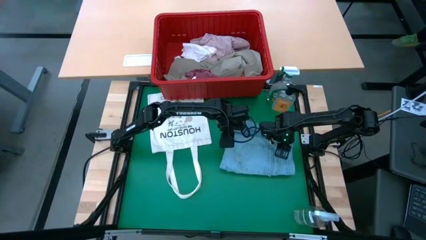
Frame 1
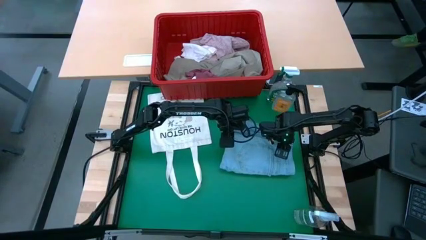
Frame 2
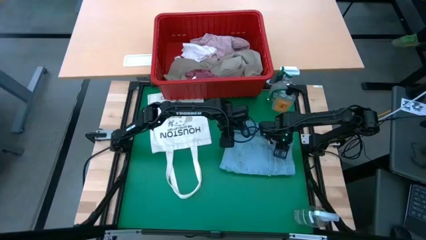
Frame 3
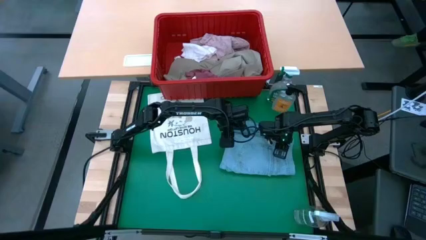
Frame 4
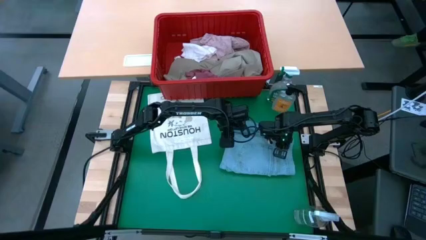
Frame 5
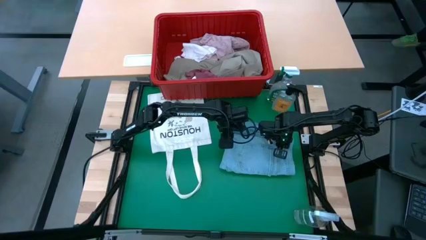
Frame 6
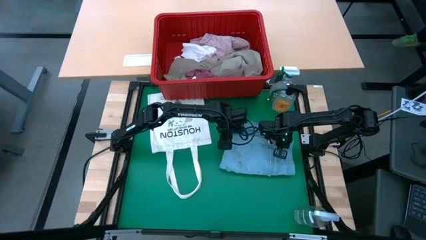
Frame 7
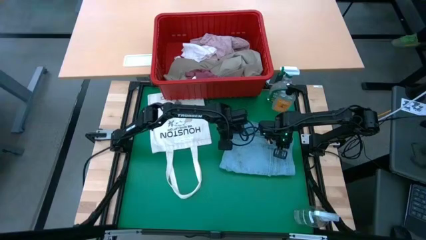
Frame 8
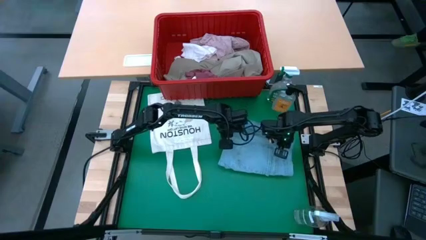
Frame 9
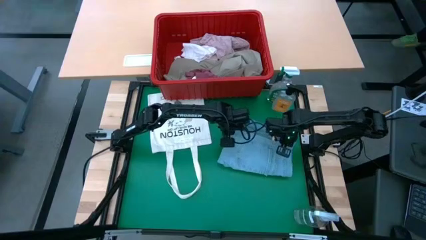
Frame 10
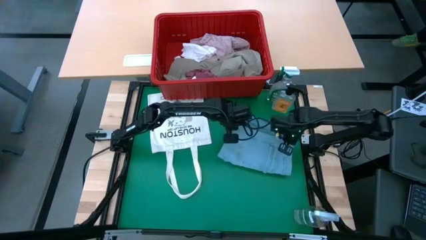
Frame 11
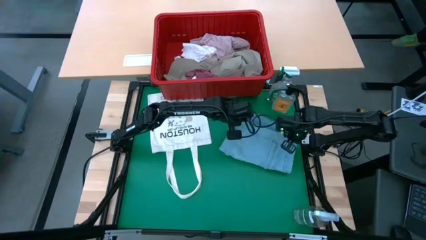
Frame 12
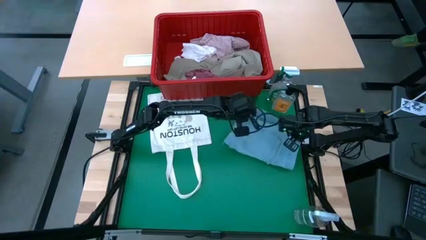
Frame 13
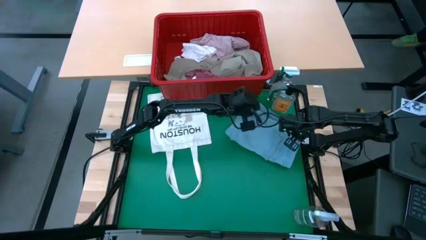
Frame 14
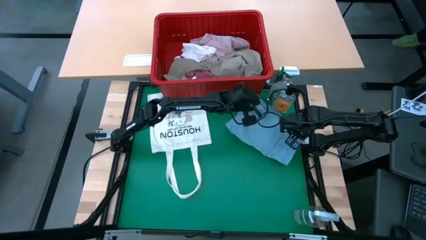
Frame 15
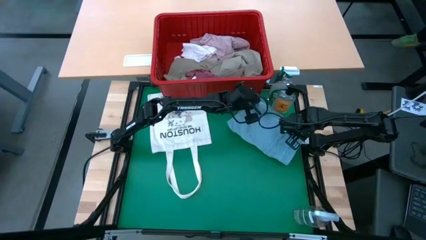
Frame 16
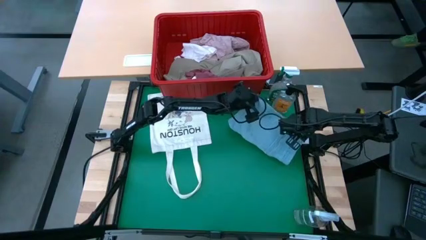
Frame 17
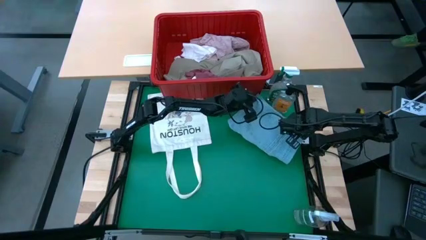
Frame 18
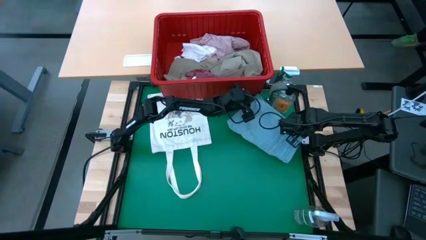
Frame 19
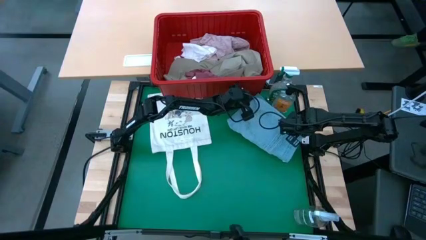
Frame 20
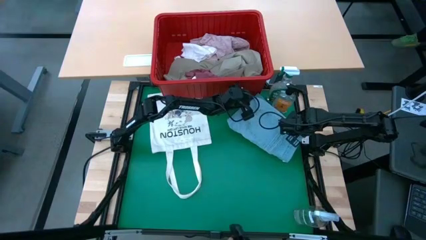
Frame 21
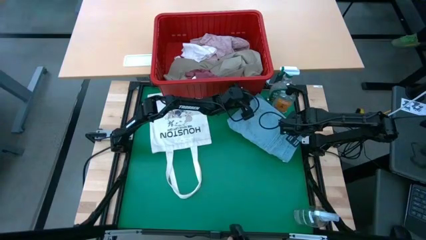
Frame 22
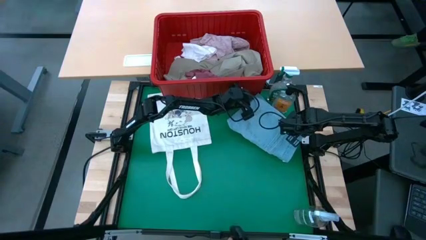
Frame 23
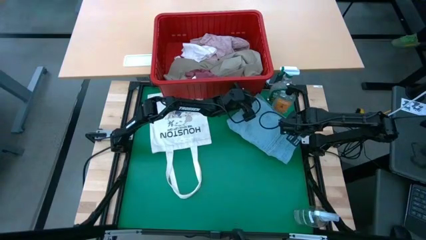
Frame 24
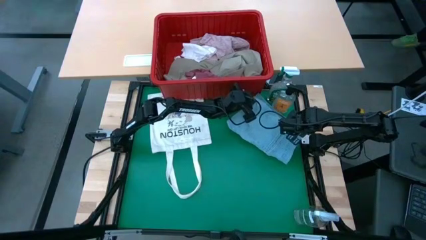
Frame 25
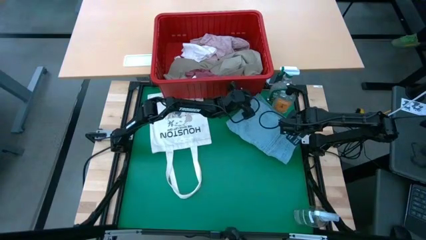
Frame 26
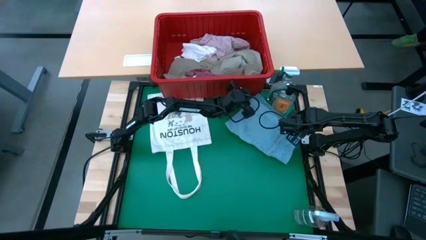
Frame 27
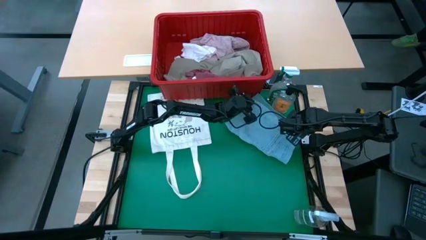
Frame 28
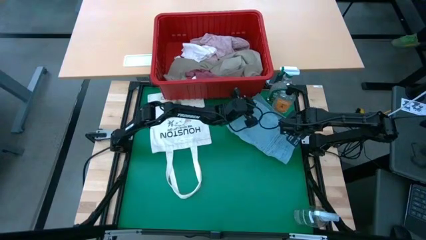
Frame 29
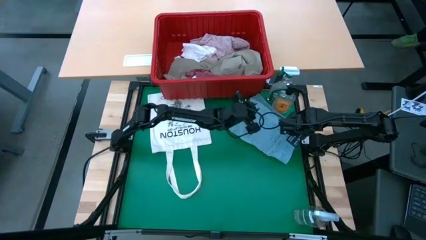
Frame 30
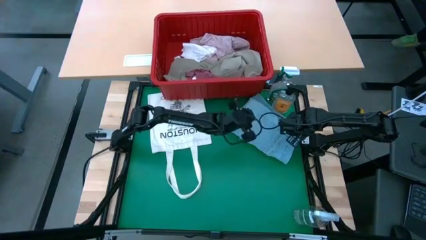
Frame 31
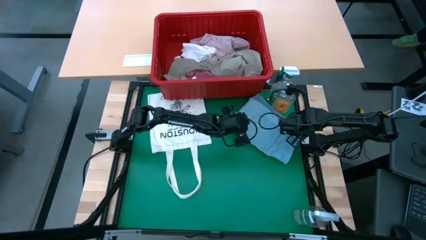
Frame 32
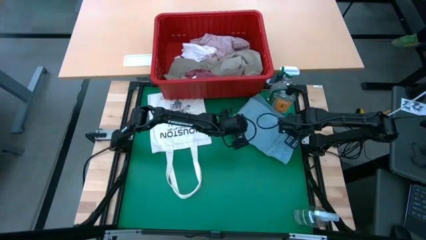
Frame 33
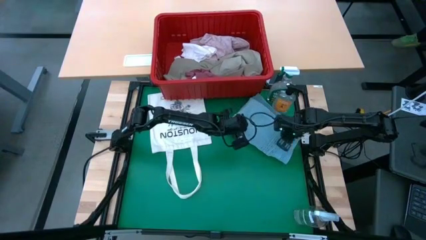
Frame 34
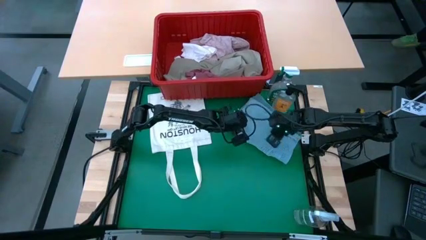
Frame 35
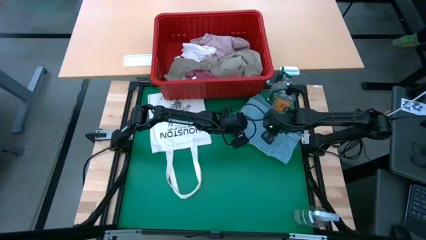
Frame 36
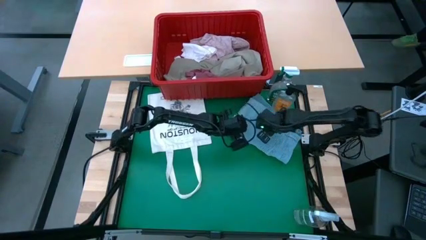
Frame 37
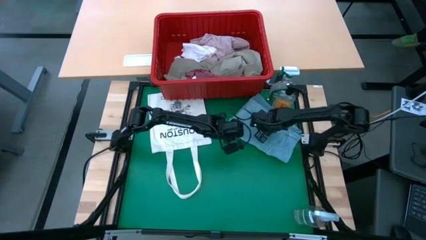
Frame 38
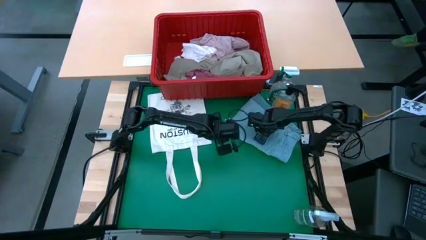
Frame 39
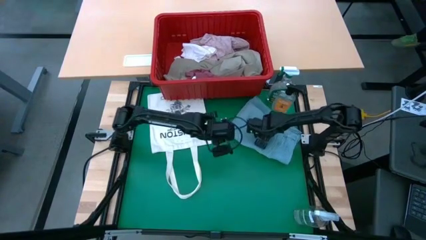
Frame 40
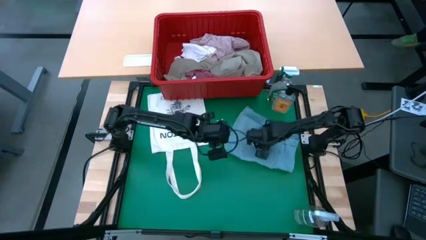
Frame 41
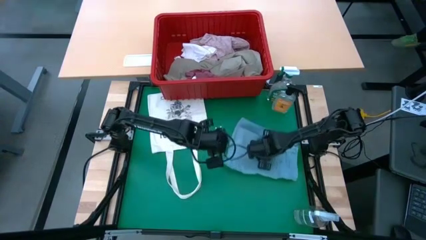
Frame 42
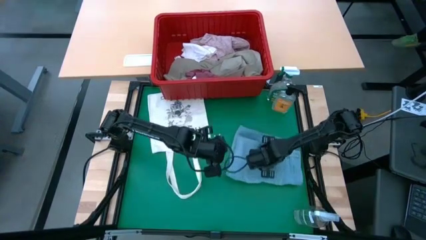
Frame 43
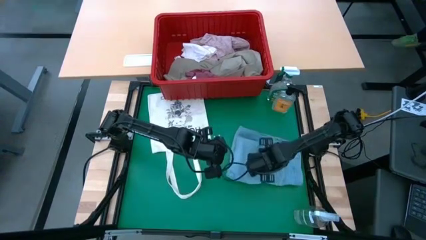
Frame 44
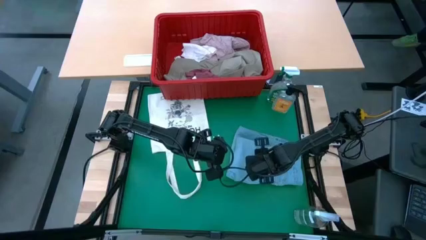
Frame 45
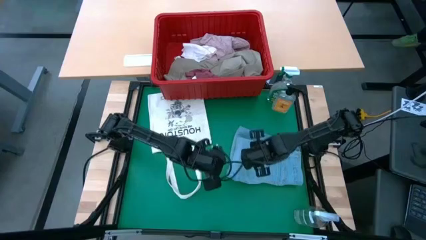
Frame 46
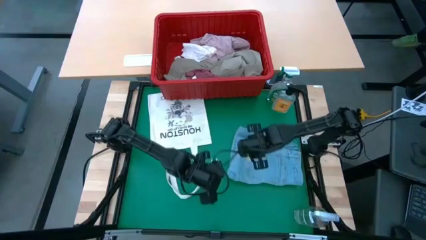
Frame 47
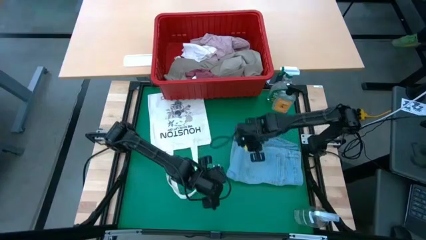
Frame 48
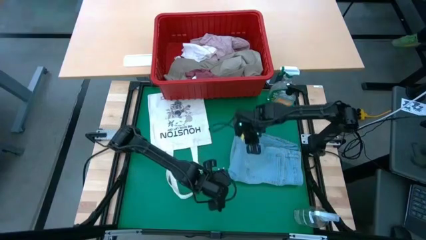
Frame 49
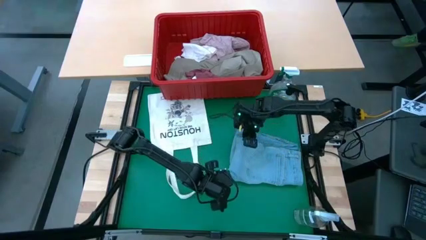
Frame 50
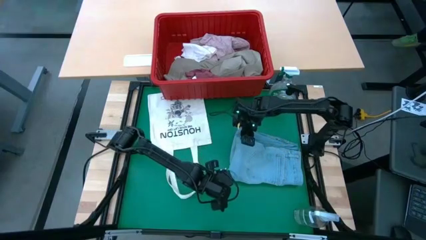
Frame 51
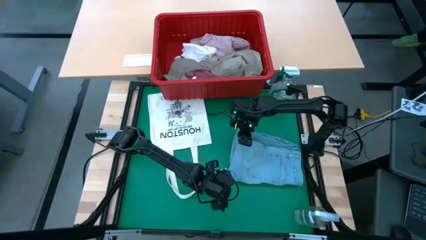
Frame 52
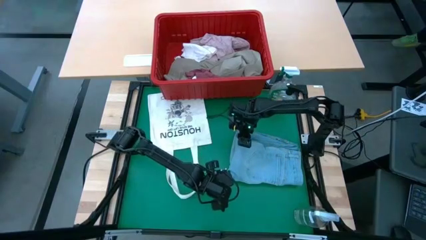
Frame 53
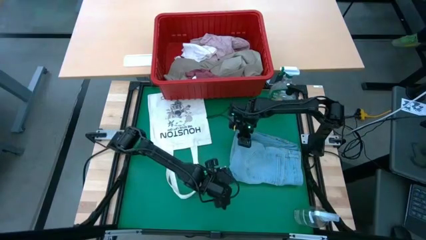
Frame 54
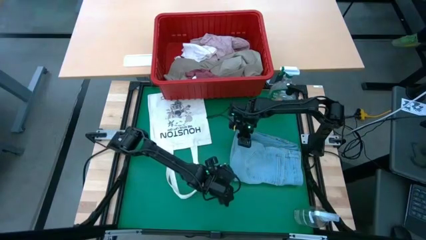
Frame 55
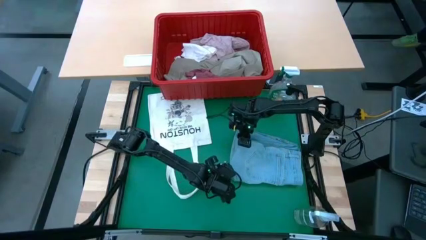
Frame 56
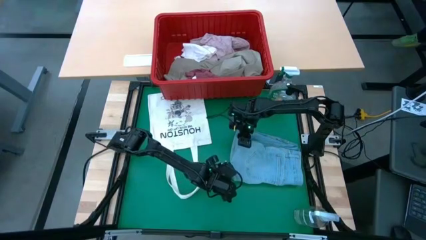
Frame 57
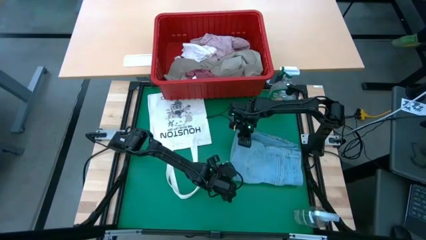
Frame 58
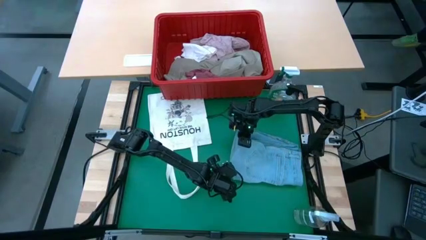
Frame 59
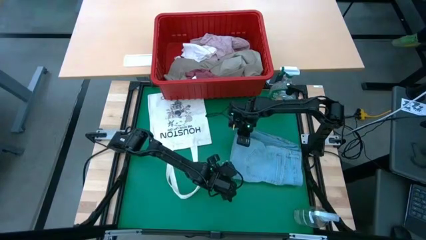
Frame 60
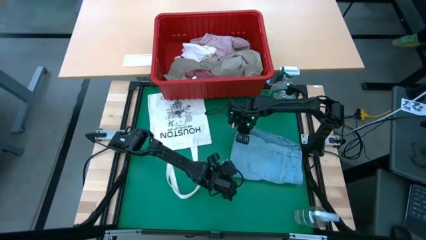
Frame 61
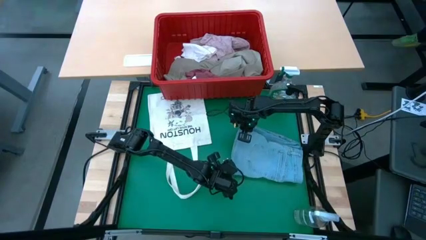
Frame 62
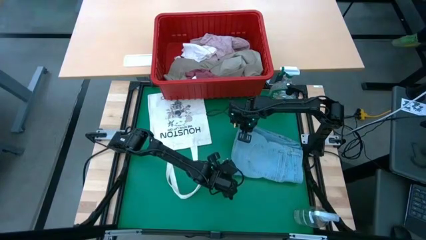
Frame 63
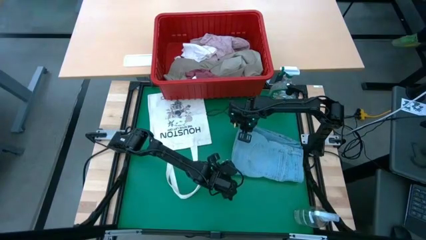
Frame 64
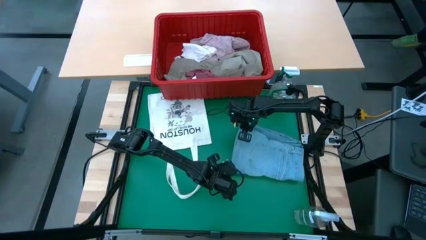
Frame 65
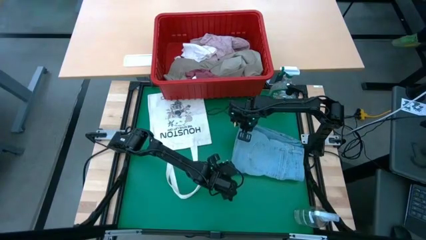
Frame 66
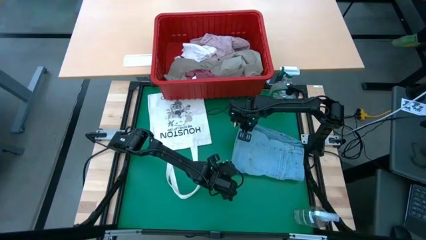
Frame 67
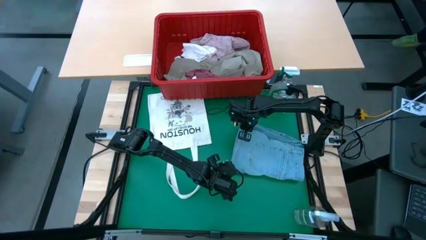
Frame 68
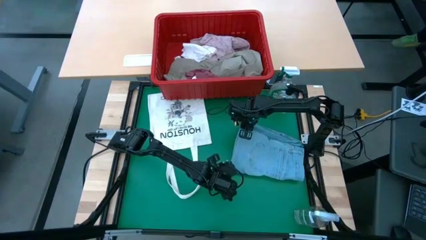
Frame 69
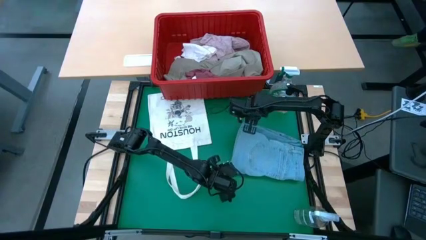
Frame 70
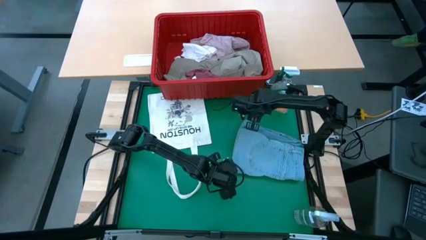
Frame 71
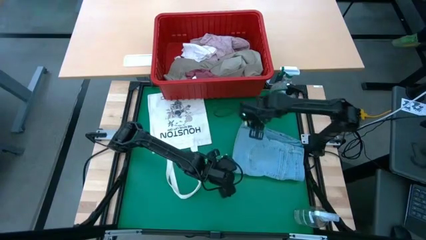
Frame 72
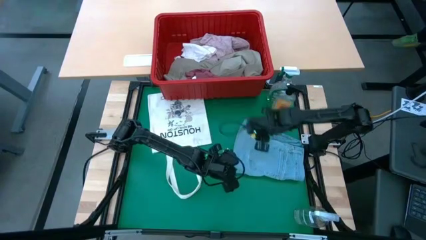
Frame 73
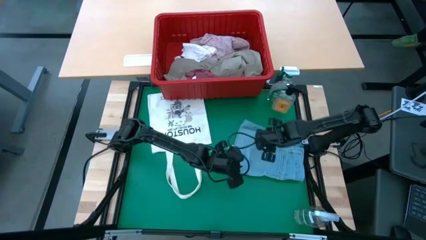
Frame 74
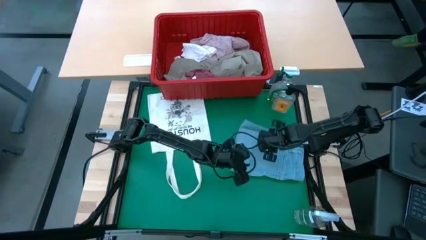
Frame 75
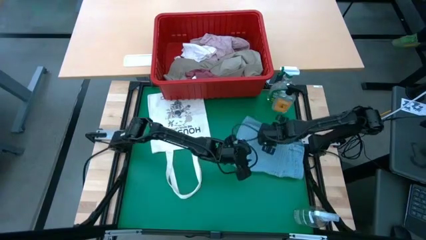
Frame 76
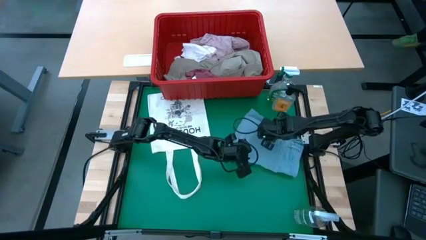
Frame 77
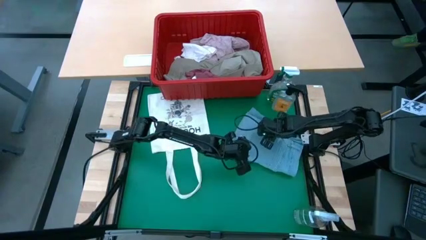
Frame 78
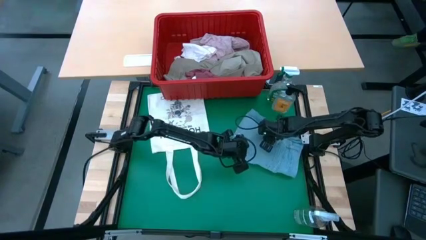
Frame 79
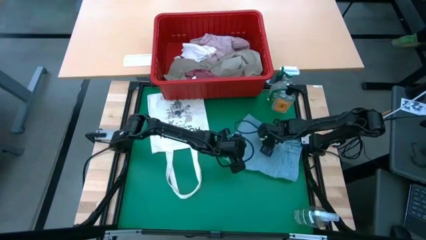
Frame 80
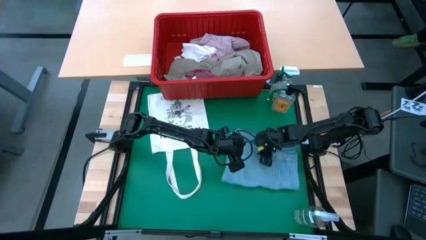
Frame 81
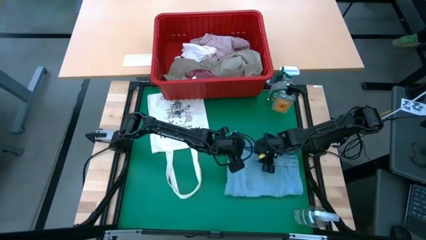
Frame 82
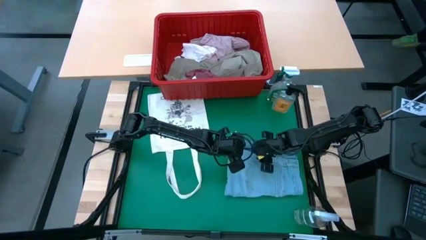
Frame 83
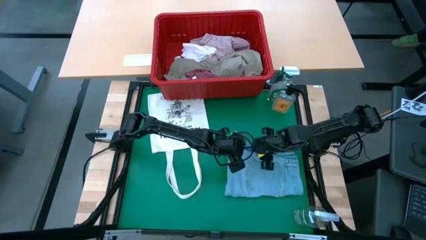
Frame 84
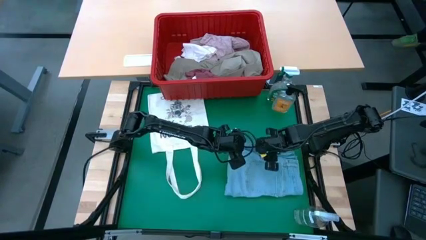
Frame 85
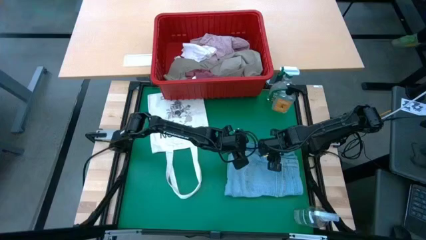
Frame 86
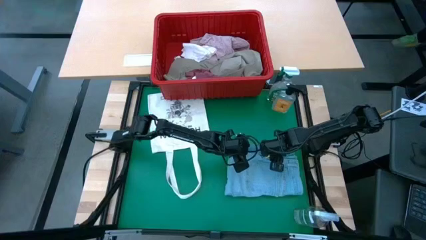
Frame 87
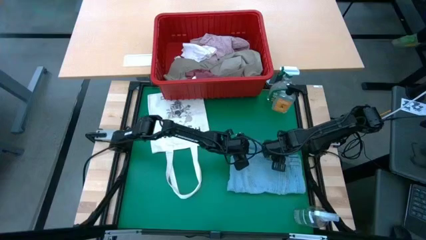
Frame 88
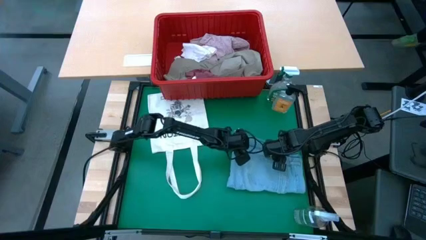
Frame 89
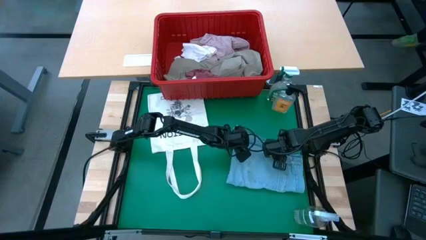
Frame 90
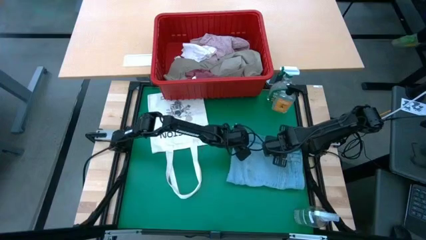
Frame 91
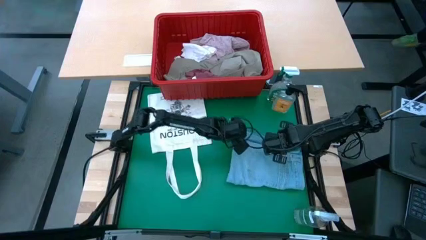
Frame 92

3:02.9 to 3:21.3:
Task: Fold laundry
Fold the light blue pants
